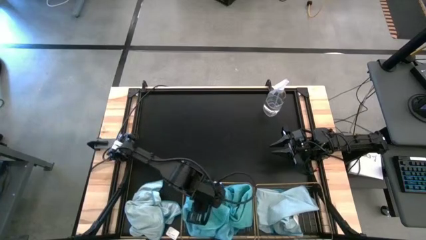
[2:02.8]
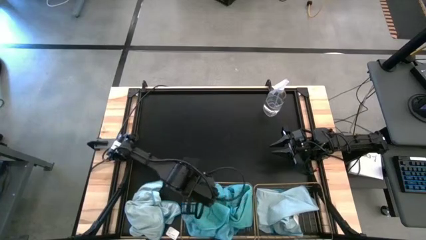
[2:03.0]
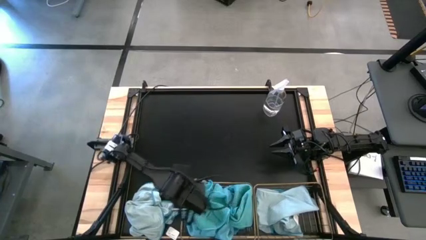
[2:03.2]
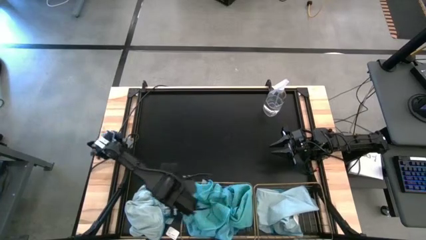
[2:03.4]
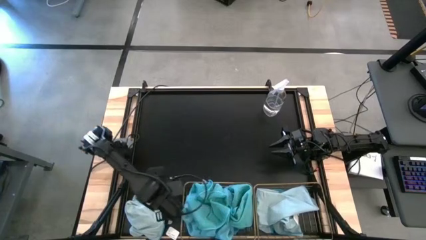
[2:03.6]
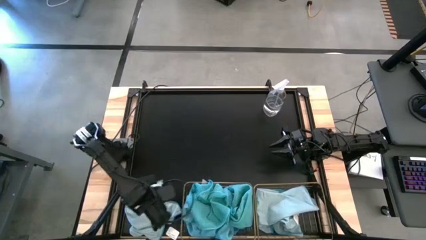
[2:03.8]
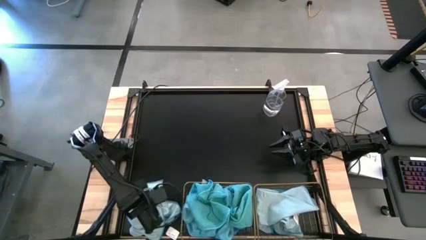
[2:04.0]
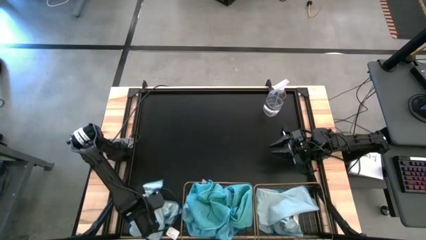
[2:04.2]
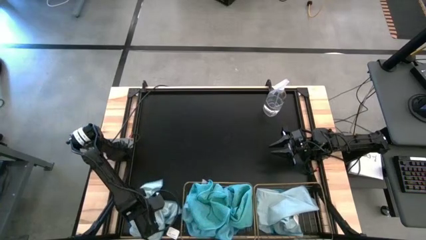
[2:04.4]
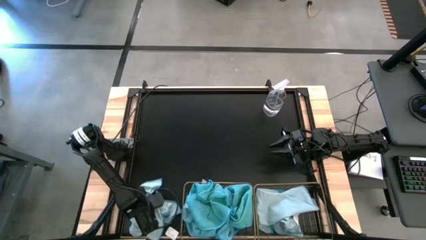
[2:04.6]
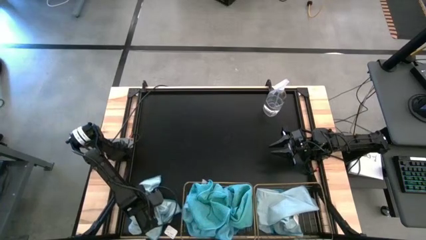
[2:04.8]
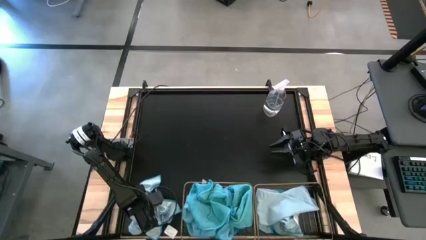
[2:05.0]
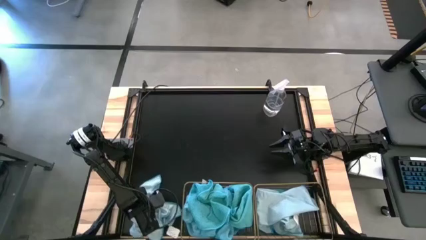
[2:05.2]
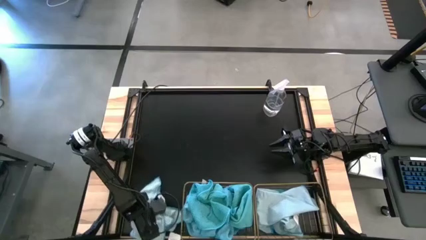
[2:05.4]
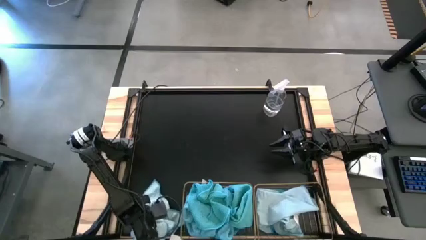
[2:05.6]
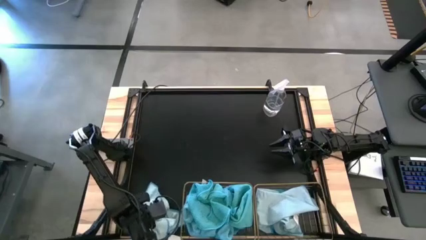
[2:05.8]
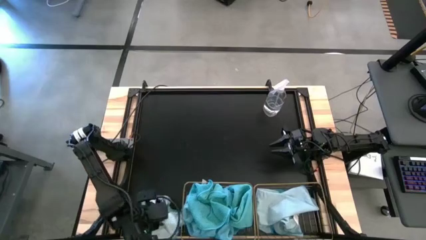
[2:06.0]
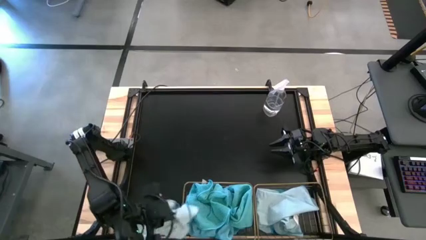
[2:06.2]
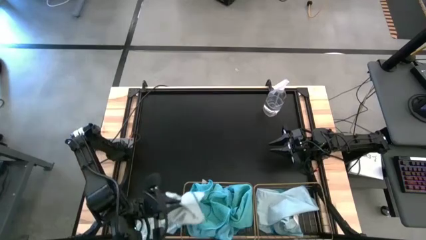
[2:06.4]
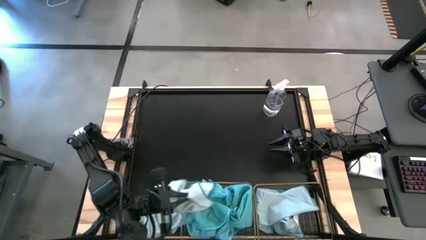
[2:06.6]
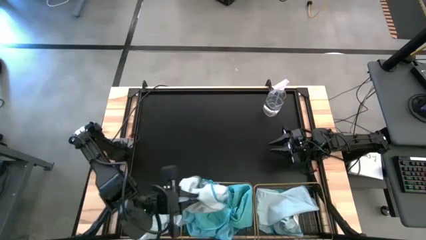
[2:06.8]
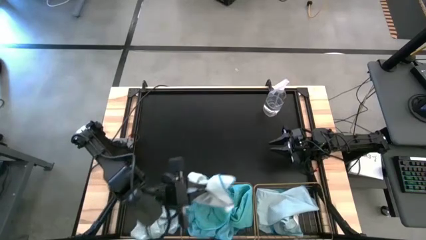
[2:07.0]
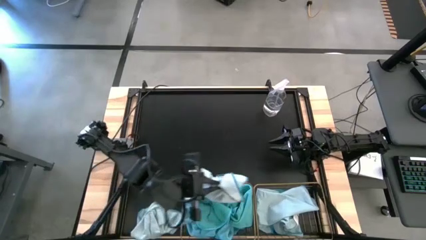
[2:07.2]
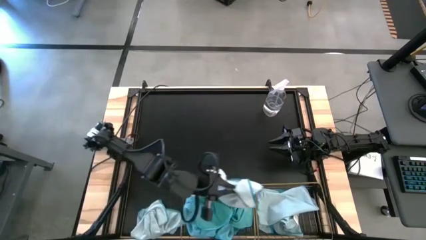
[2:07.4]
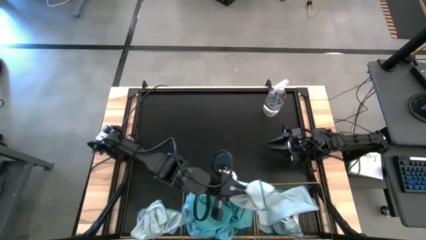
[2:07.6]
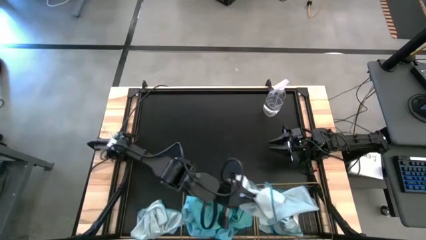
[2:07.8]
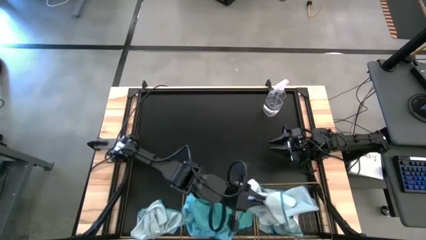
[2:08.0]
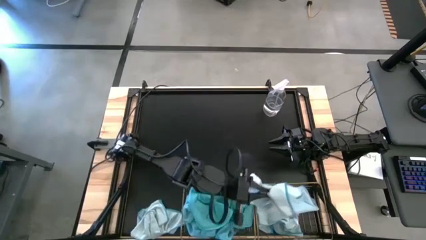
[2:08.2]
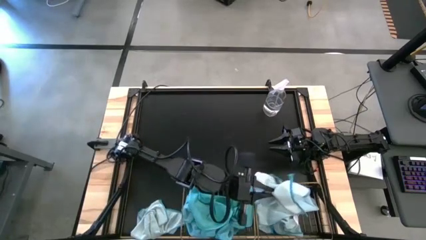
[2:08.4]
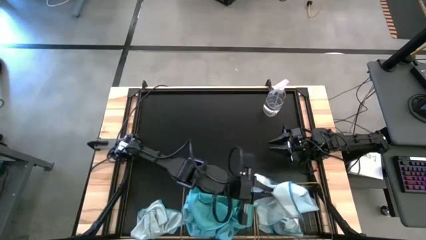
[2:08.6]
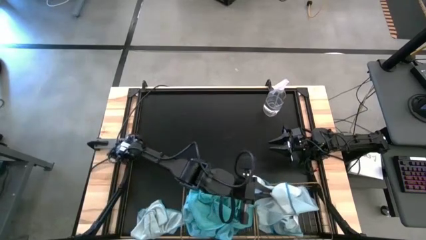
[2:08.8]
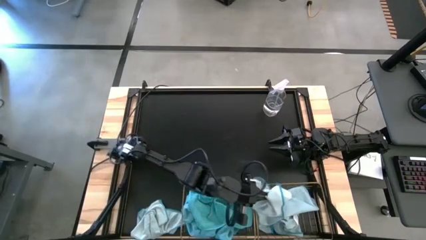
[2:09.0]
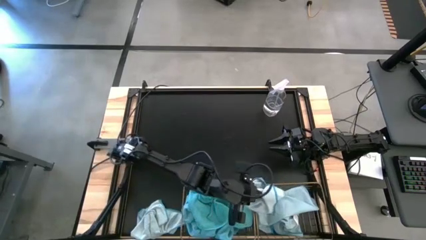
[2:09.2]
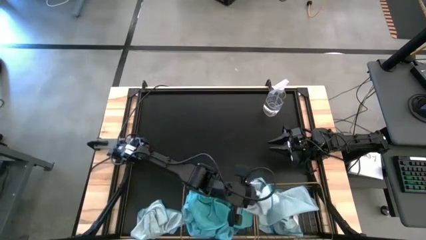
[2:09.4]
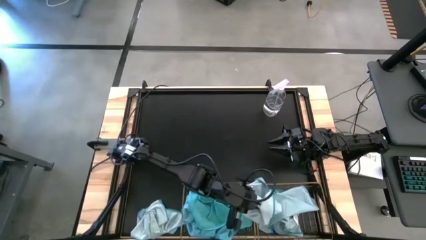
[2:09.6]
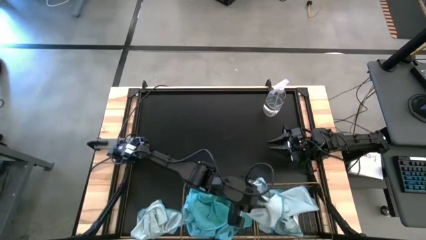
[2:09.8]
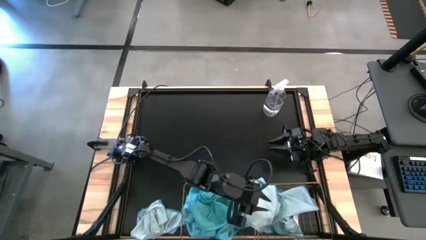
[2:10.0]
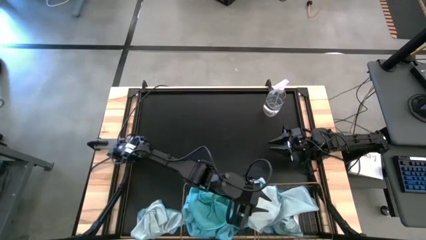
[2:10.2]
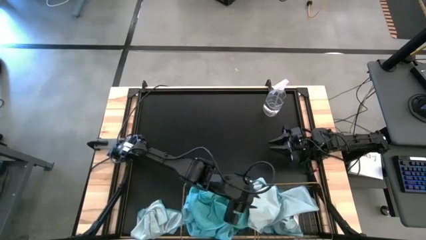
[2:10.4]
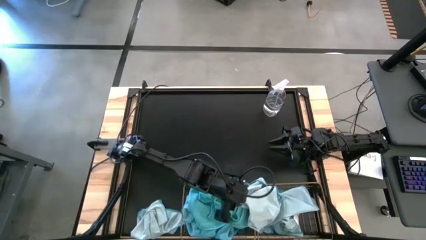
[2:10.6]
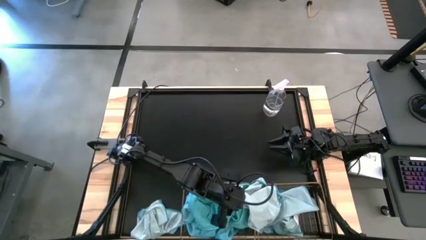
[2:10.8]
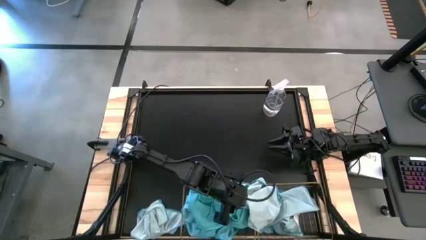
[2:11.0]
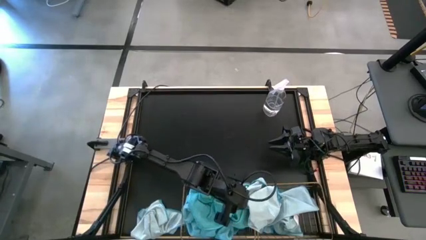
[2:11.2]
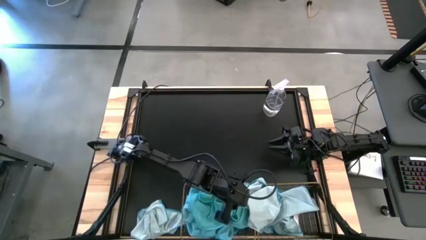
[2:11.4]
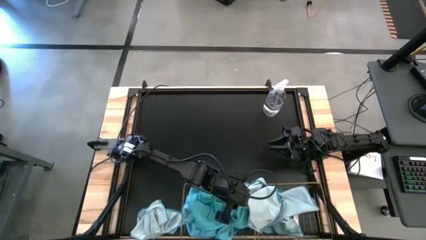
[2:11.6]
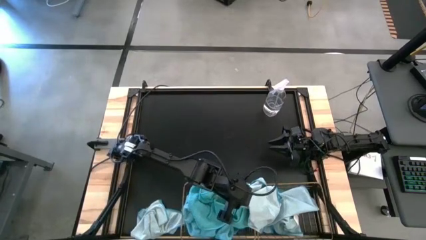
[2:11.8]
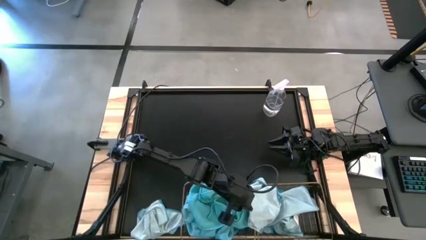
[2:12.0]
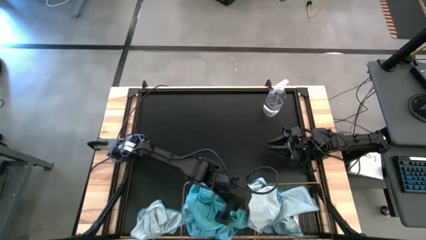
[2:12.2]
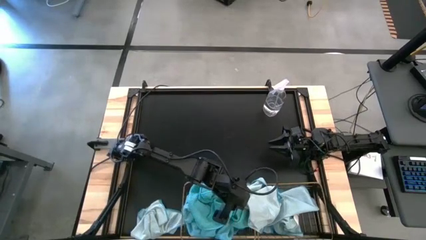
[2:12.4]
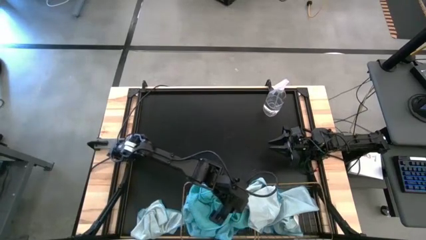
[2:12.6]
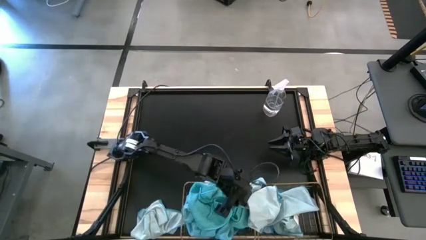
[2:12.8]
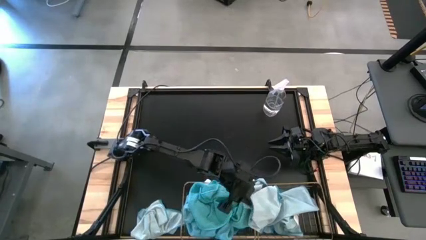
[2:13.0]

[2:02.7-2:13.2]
Task: Sort microfiber towel by color & place in baskets
Put the light blue towel into the right wire basket
